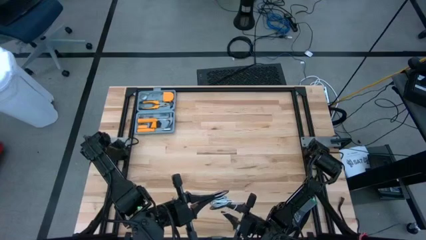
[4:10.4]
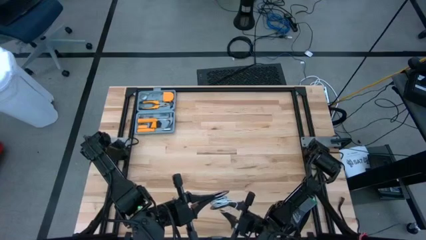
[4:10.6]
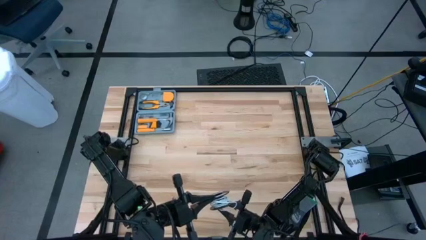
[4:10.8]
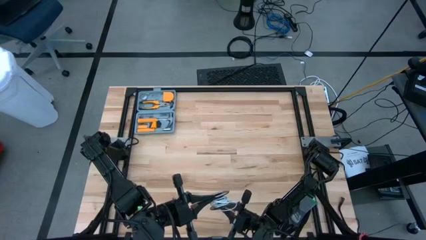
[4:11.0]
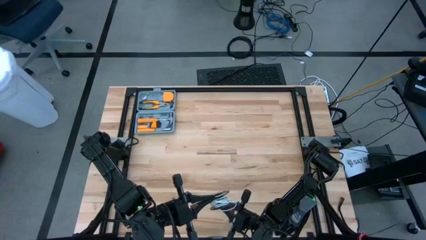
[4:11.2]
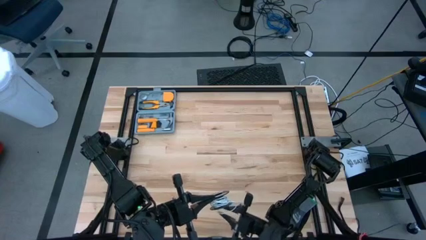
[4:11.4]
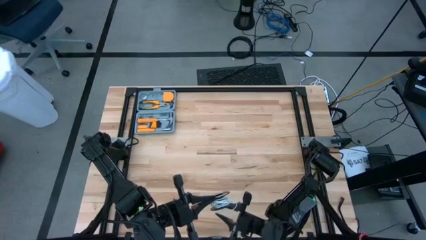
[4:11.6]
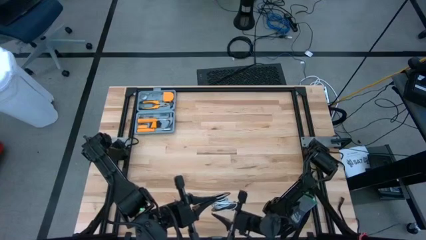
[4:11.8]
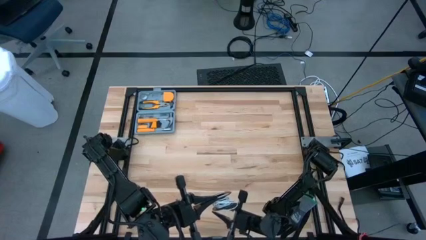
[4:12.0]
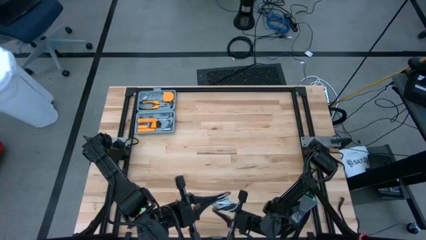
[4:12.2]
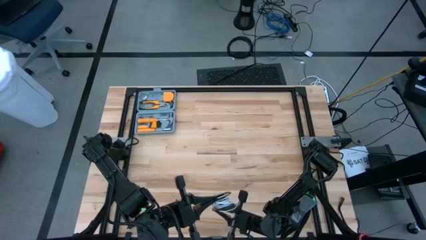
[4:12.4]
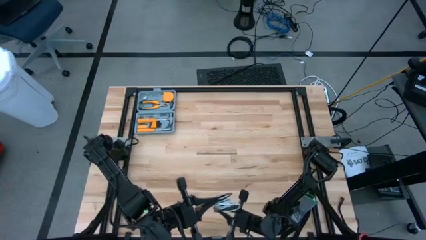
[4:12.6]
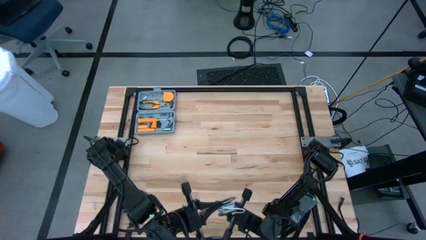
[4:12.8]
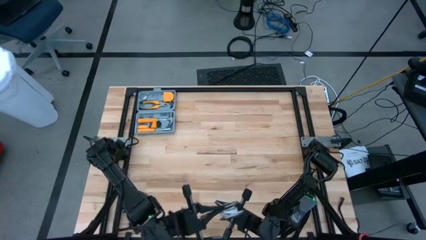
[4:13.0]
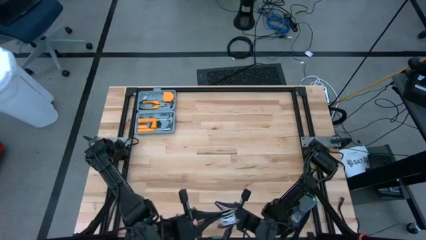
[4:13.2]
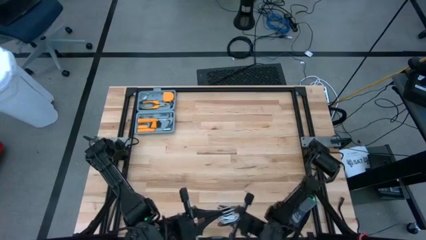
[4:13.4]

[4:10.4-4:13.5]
Task: Coil cords
Coil the white wire on the spool

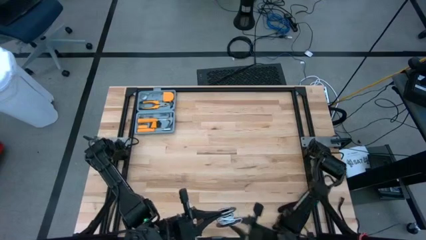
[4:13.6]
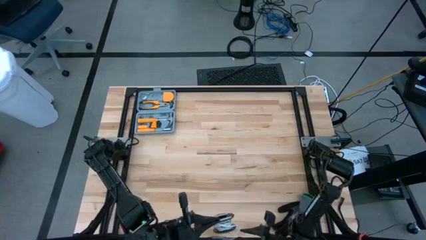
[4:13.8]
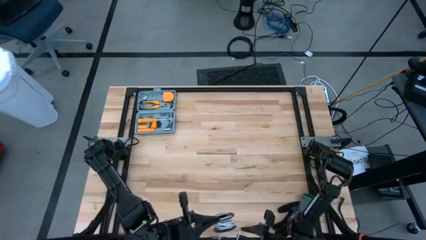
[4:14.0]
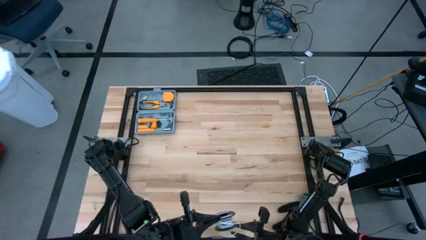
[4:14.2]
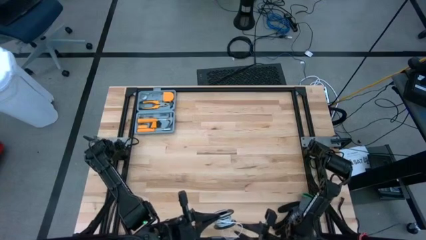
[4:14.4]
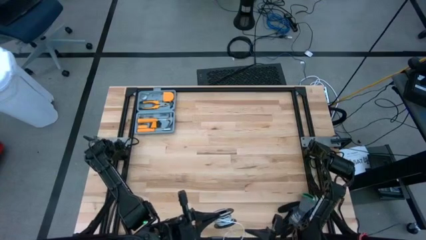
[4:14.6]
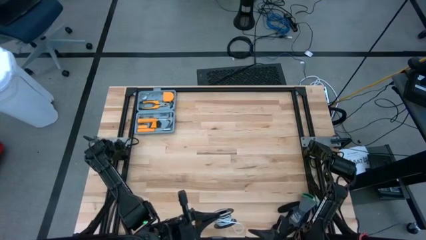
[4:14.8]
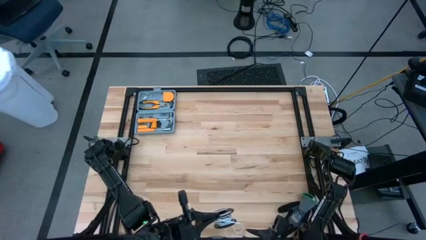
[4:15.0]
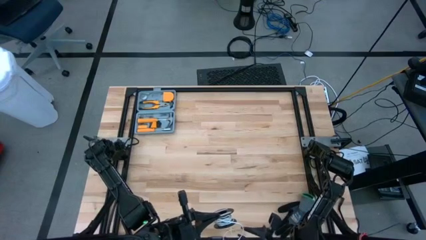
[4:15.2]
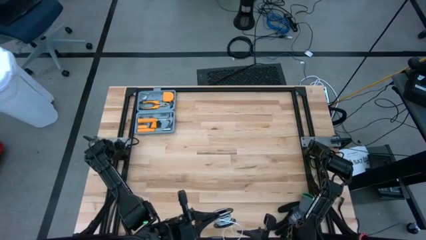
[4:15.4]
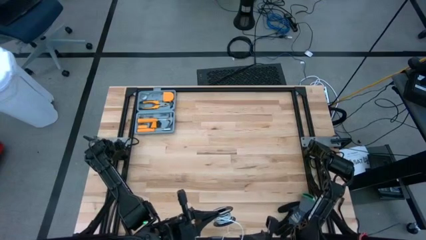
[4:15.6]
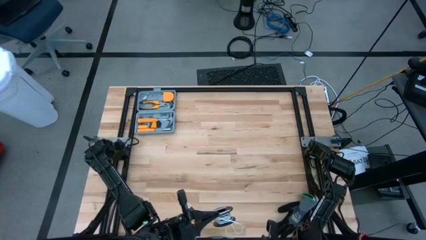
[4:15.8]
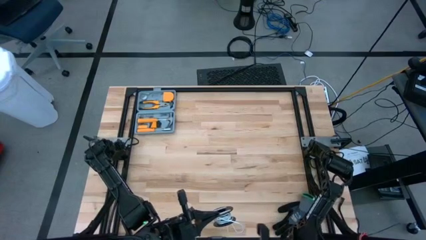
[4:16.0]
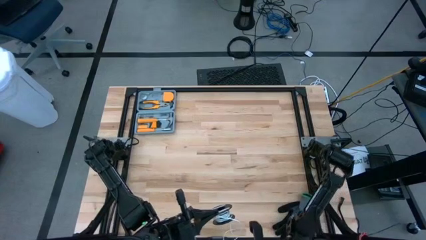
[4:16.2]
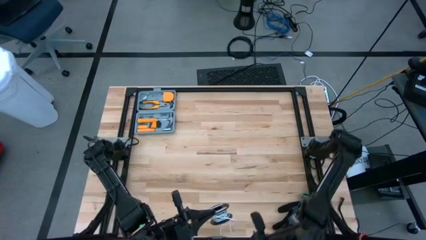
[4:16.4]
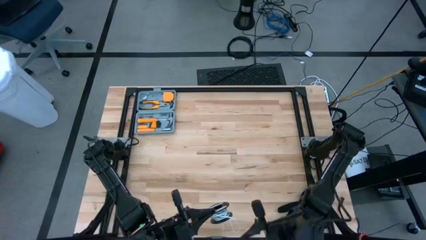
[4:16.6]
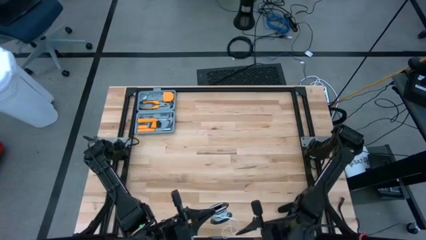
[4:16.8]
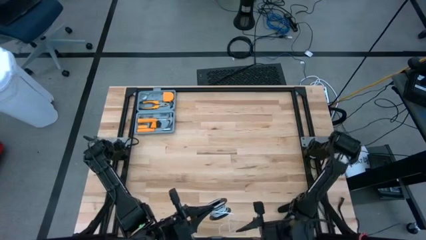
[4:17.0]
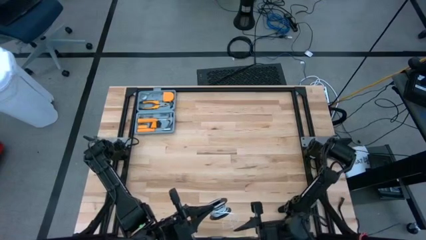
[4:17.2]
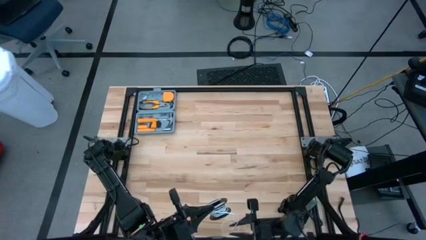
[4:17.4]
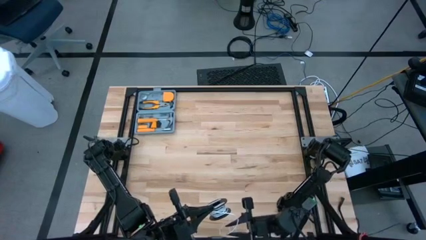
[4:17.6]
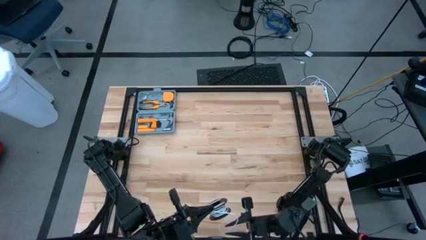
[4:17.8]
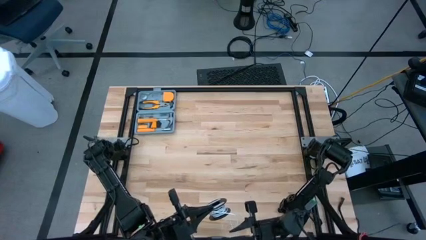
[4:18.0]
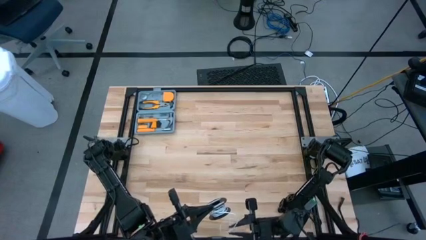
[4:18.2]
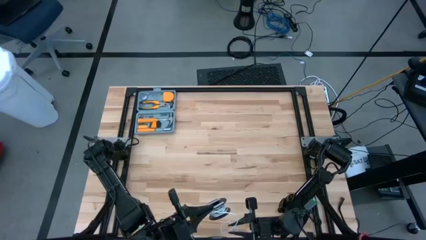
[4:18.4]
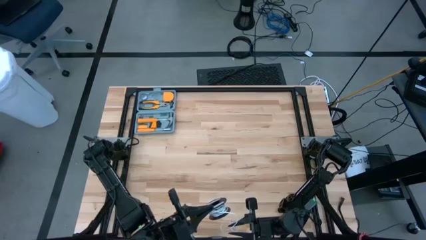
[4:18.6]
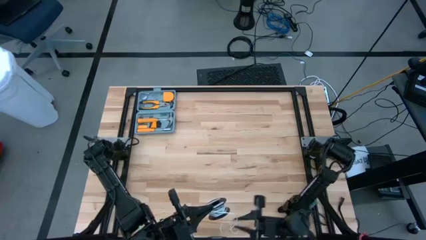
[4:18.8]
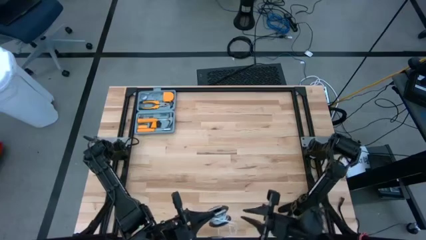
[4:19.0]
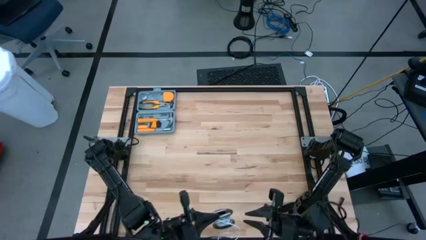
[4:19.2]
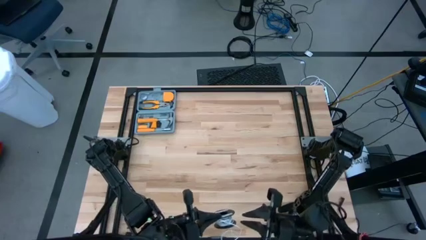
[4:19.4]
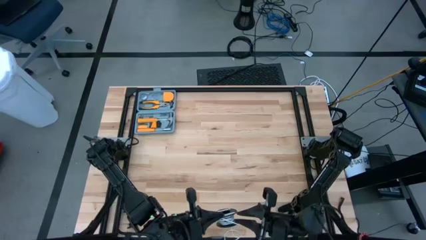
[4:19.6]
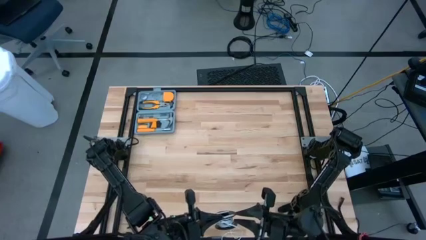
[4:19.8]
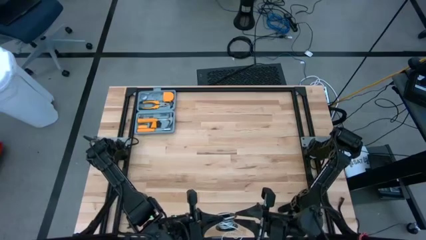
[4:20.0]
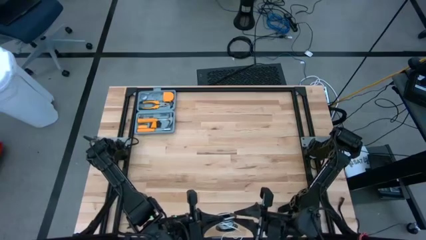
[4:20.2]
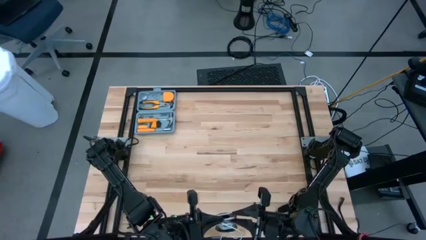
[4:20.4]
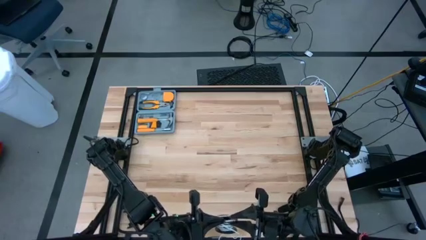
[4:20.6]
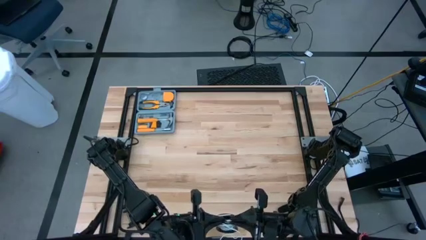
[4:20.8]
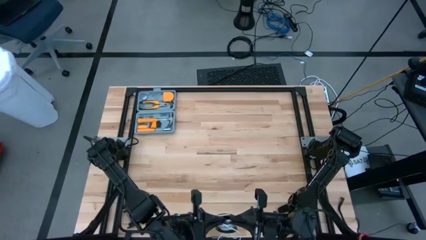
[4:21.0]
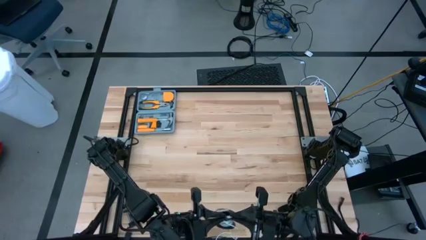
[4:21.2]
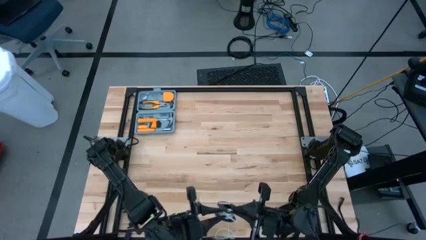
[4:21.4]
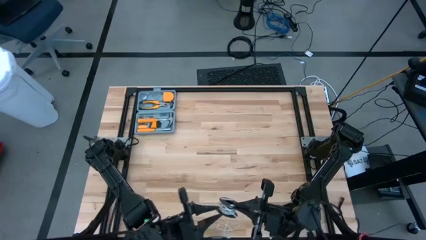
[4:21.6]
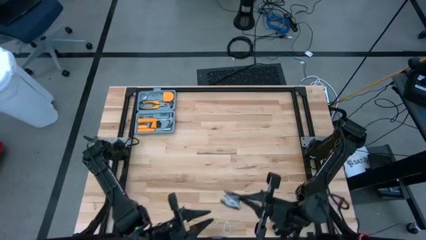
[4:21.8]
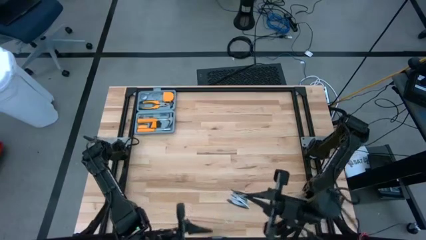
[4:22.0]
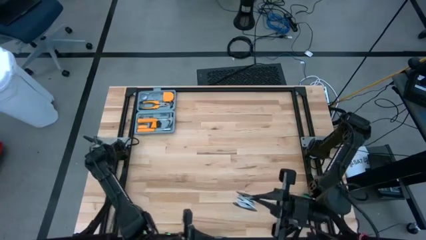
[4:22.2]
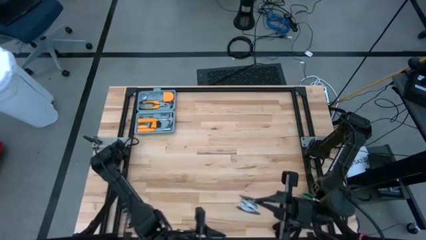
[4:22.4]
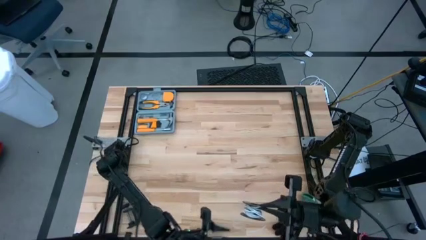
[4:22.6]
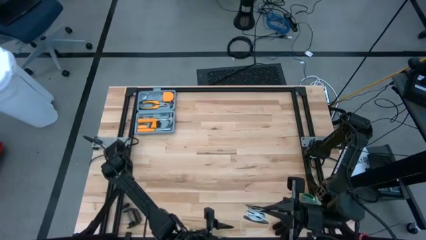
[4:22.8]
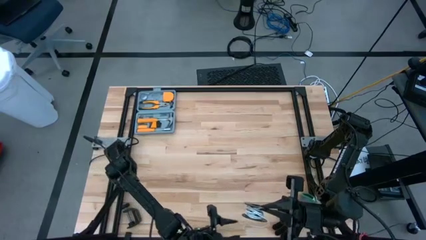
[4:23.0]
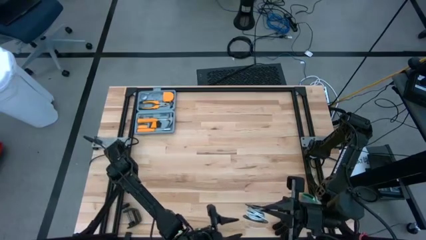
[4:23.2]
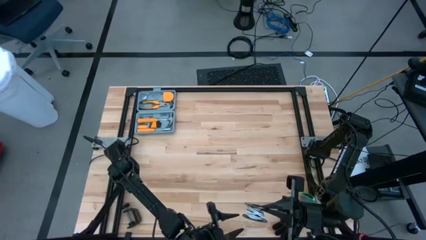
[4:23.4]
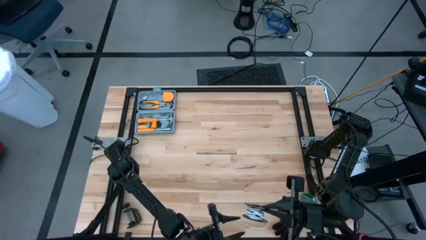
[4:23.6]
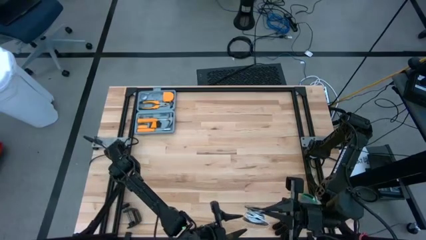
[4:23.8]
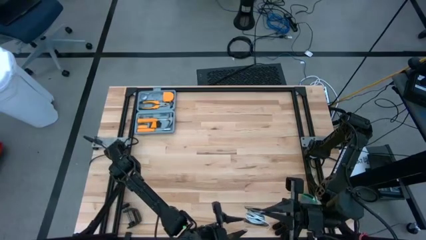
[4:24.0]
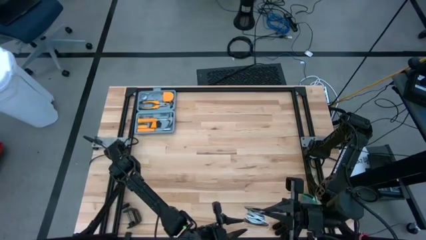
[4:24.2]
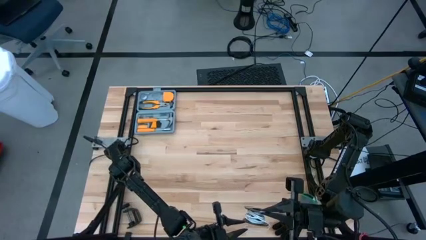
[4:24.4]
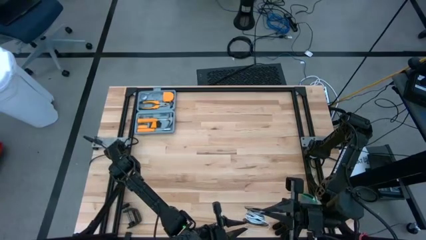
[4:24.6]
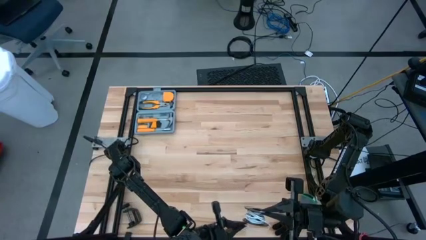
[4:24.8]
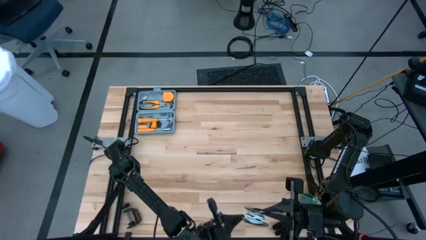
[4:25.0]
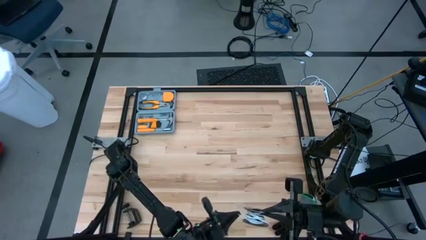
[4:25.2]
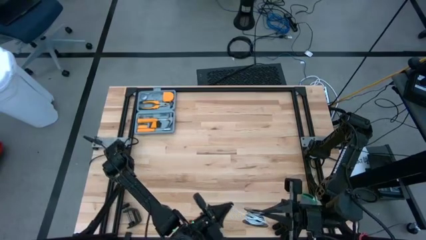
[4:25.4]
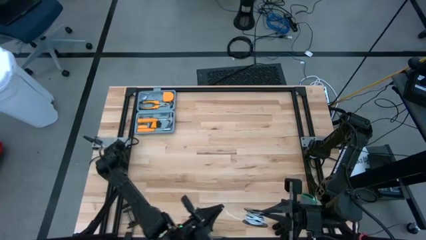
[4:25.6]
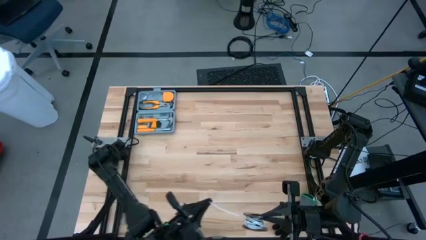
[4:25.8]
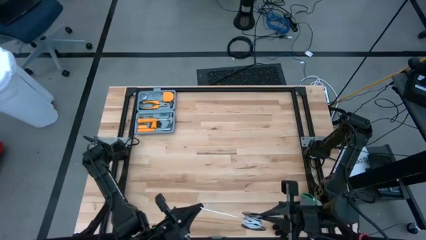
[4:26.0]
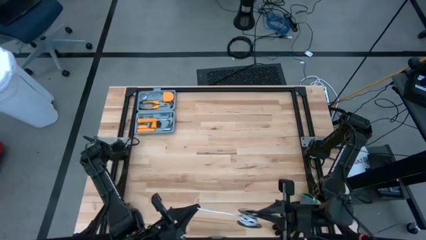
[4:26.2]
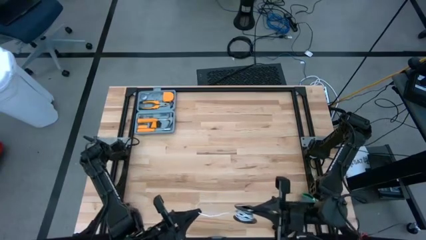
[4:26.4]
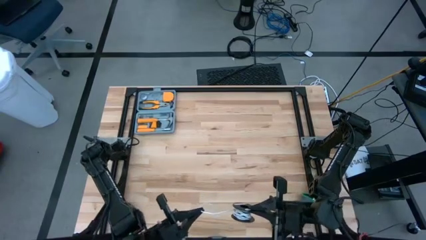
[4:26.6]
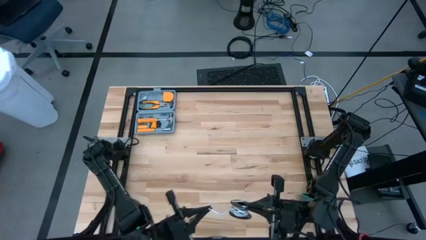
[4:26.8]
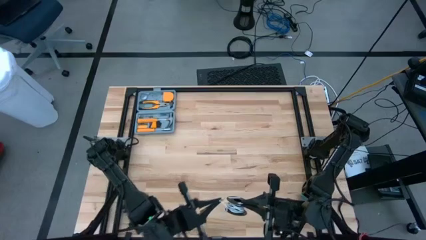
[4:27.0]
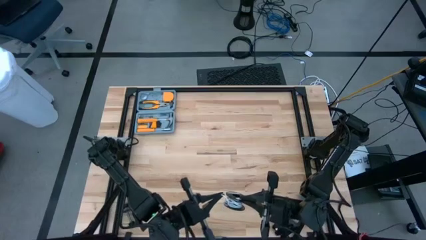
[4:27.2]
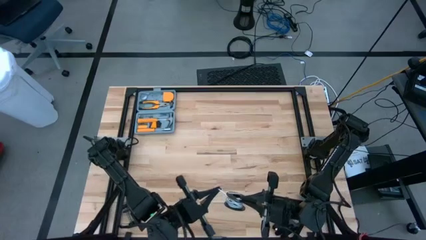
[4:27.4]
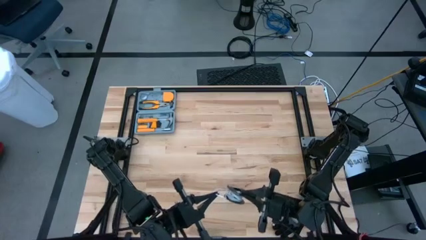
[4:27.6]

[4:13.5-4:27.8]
Coil the white wire on the spool
